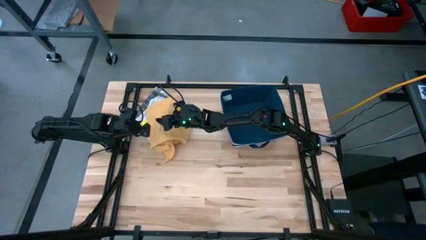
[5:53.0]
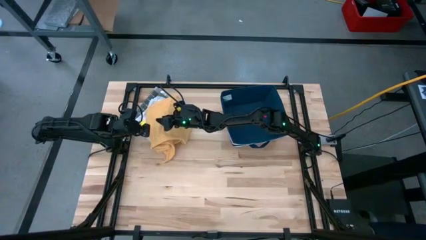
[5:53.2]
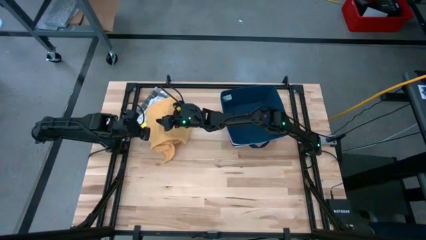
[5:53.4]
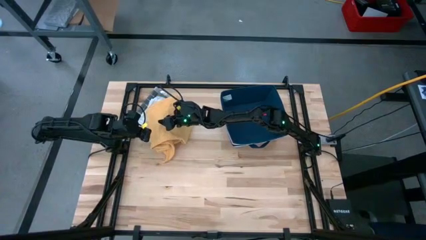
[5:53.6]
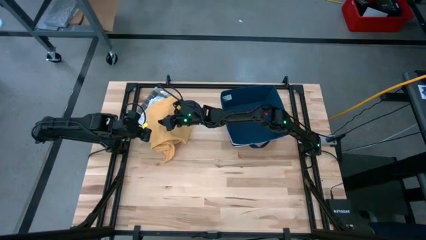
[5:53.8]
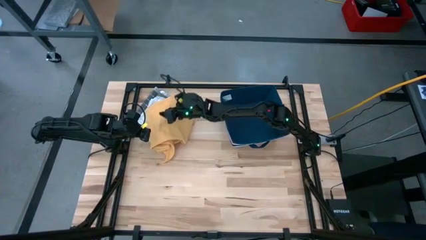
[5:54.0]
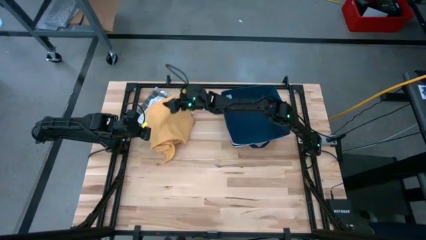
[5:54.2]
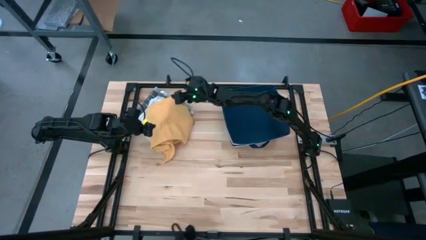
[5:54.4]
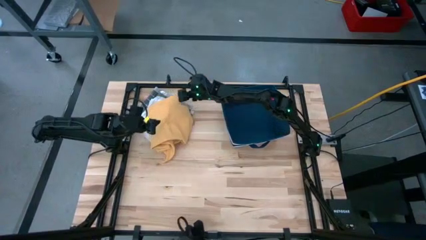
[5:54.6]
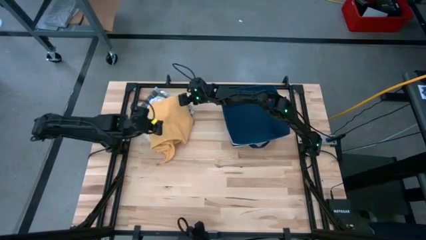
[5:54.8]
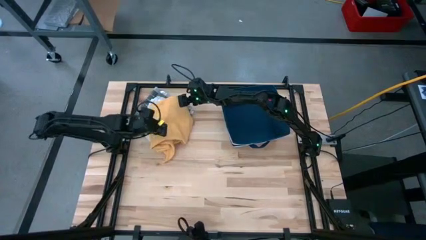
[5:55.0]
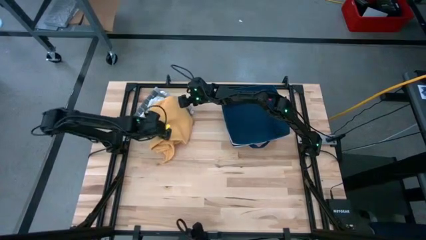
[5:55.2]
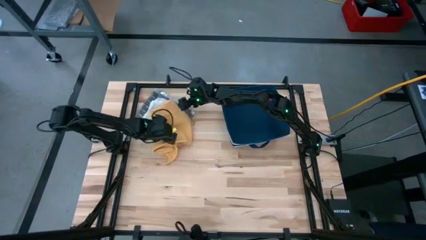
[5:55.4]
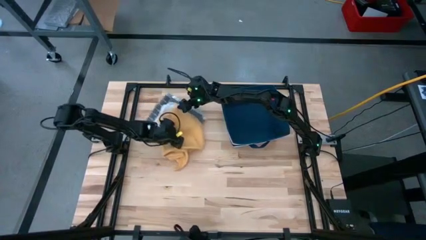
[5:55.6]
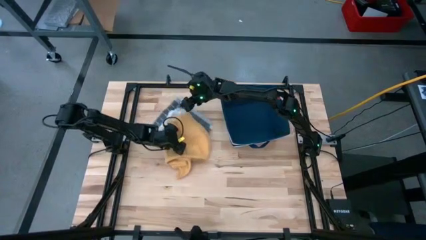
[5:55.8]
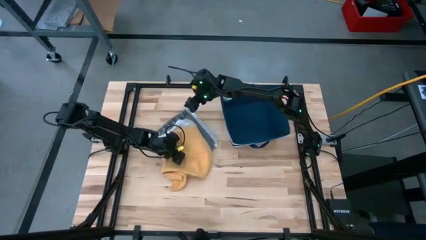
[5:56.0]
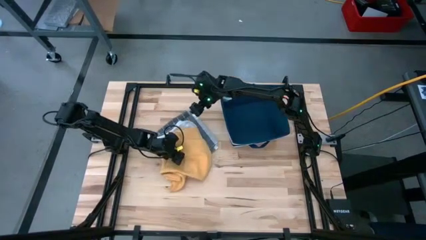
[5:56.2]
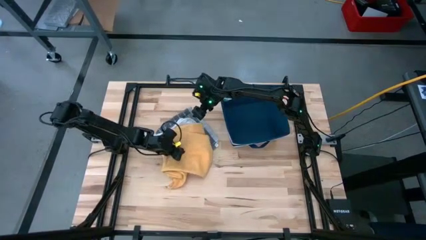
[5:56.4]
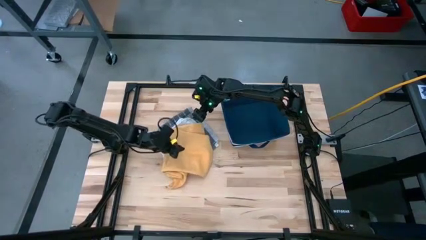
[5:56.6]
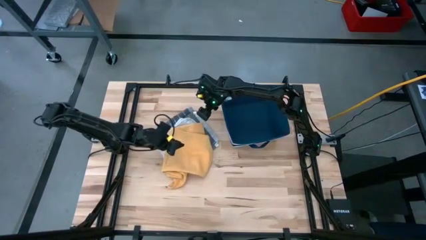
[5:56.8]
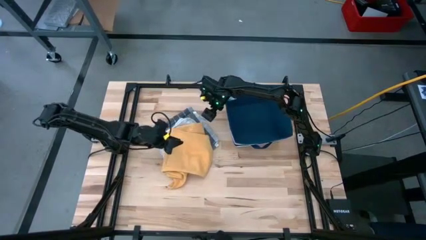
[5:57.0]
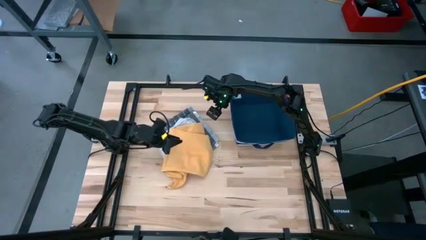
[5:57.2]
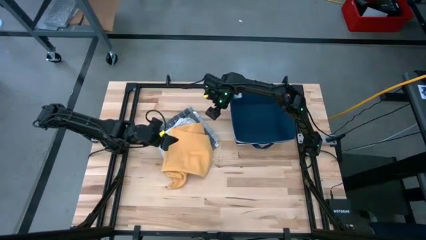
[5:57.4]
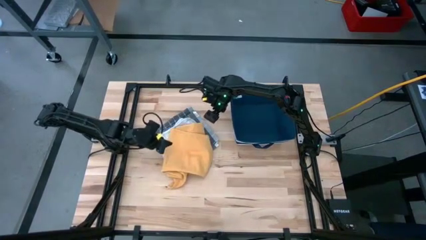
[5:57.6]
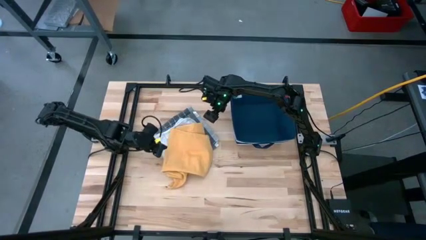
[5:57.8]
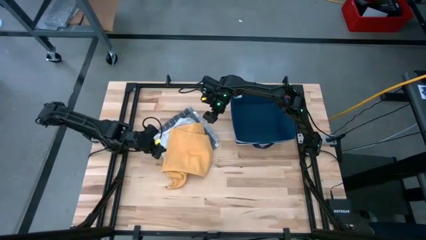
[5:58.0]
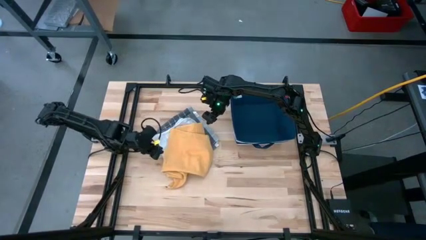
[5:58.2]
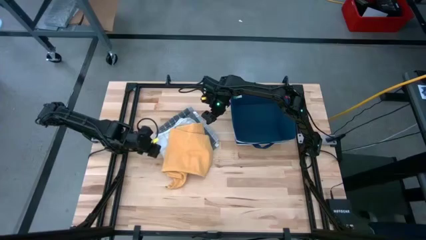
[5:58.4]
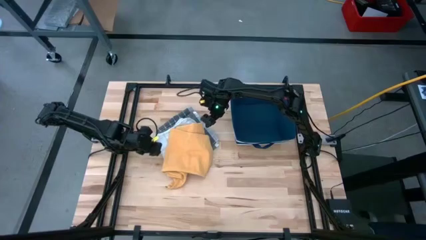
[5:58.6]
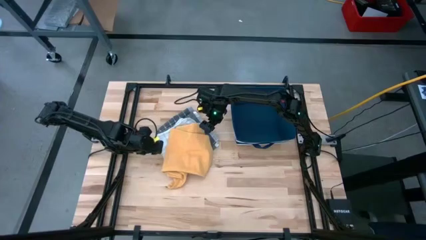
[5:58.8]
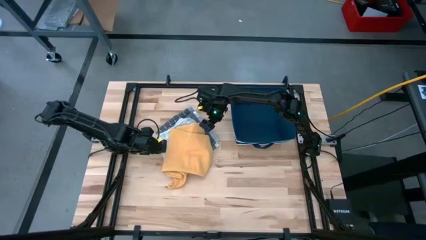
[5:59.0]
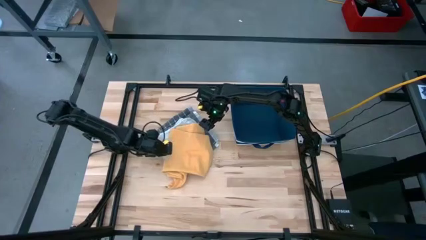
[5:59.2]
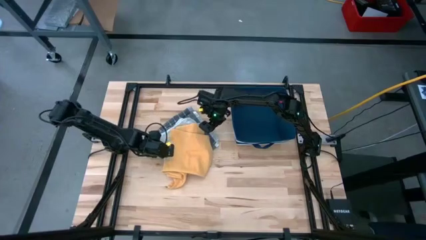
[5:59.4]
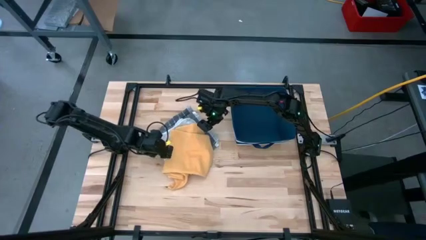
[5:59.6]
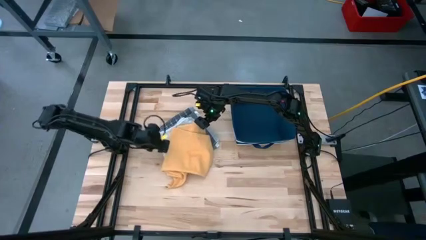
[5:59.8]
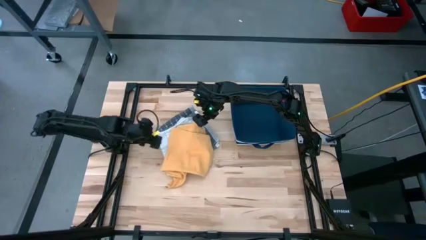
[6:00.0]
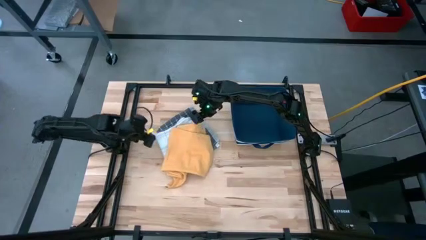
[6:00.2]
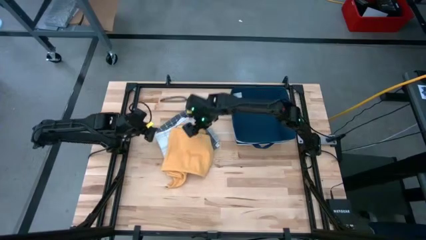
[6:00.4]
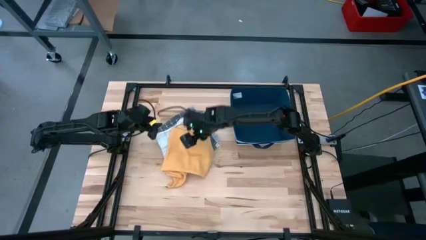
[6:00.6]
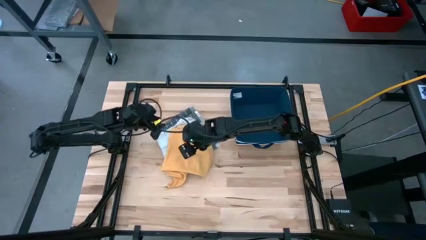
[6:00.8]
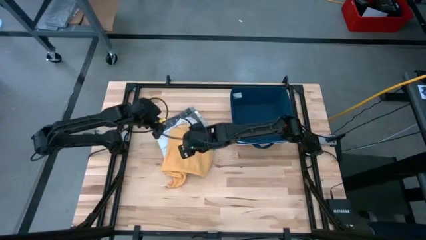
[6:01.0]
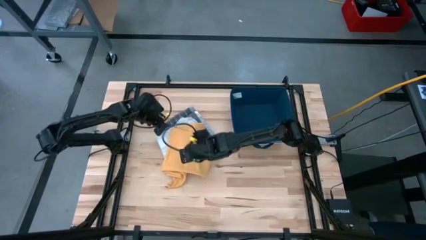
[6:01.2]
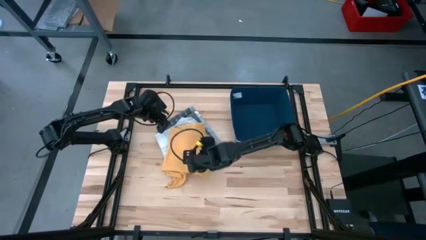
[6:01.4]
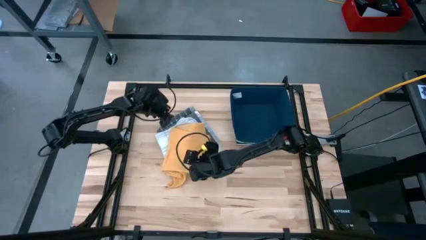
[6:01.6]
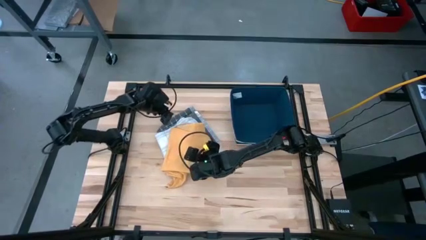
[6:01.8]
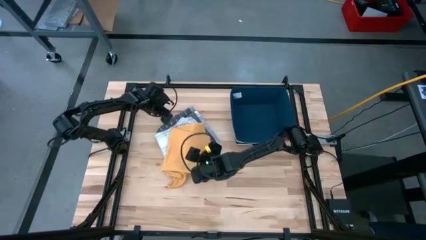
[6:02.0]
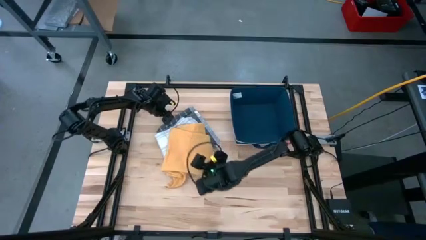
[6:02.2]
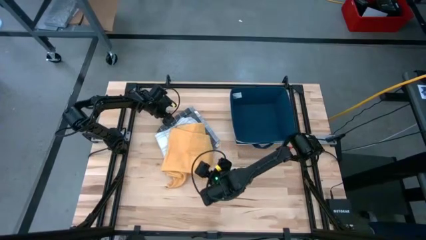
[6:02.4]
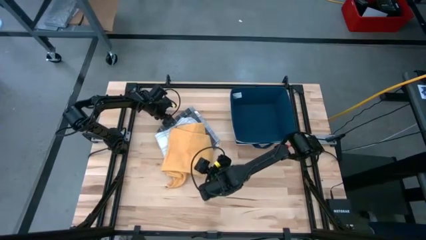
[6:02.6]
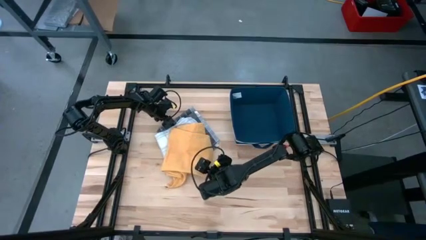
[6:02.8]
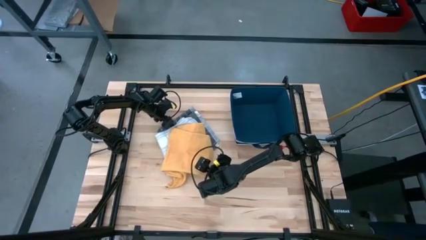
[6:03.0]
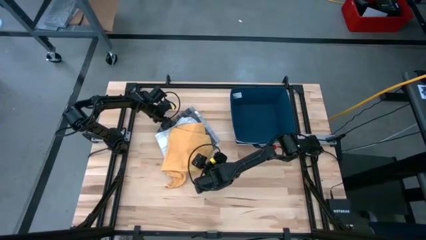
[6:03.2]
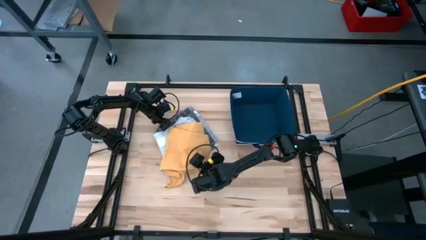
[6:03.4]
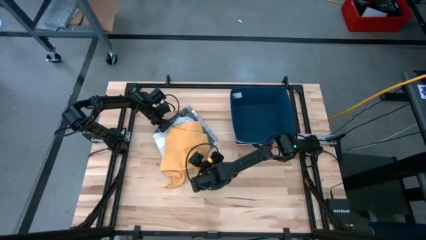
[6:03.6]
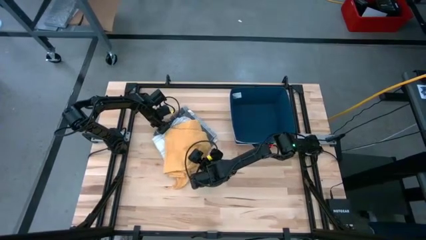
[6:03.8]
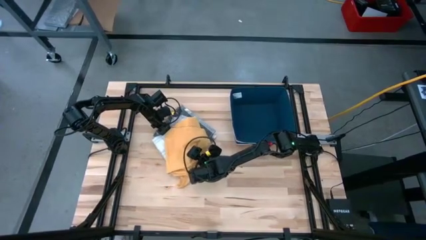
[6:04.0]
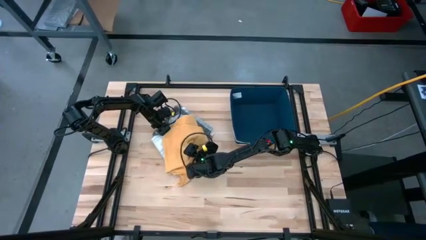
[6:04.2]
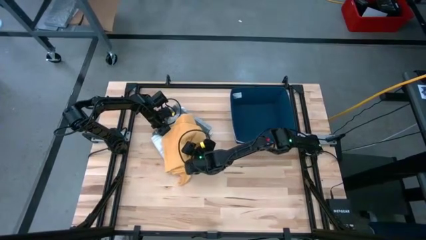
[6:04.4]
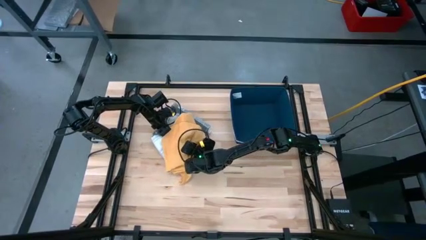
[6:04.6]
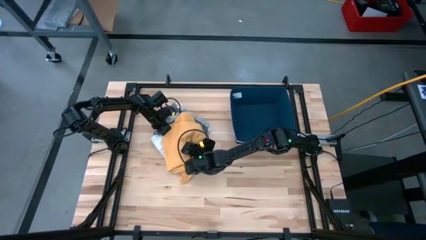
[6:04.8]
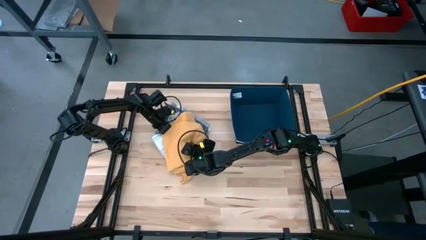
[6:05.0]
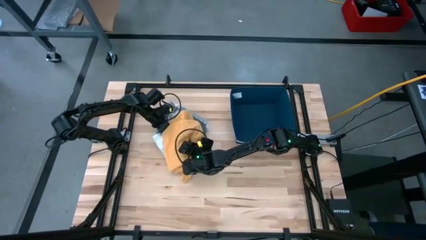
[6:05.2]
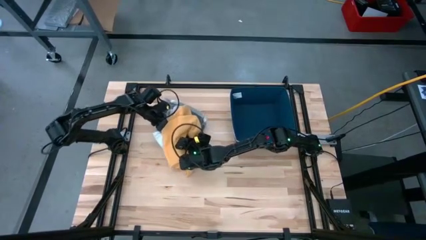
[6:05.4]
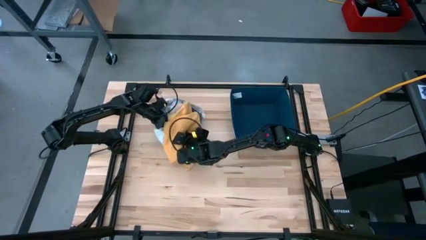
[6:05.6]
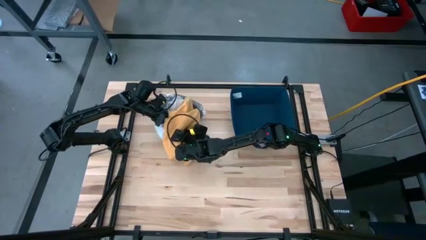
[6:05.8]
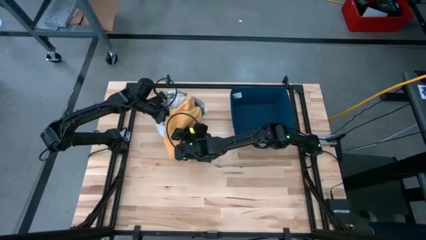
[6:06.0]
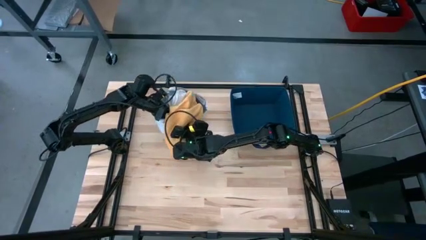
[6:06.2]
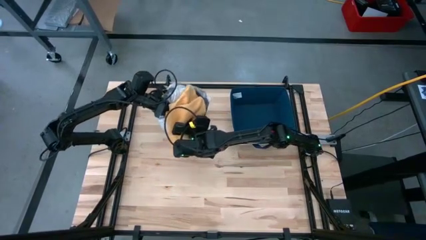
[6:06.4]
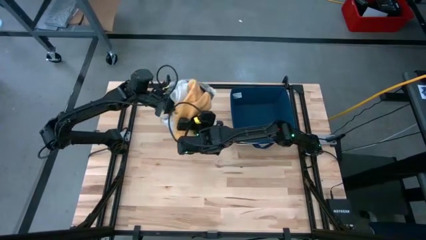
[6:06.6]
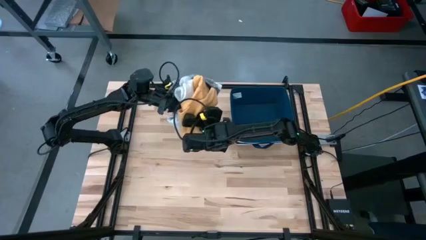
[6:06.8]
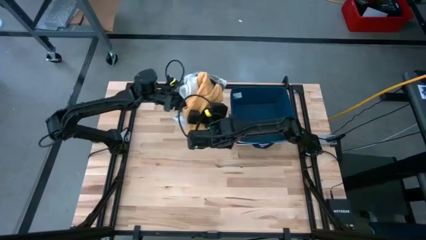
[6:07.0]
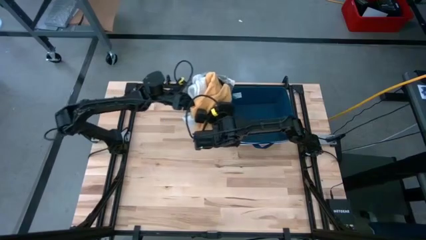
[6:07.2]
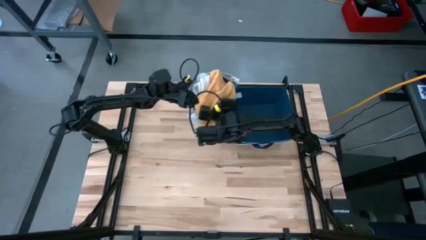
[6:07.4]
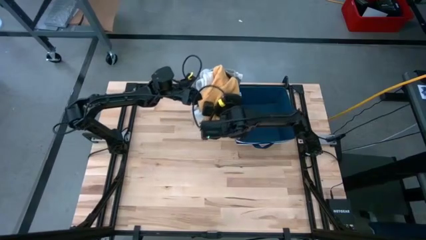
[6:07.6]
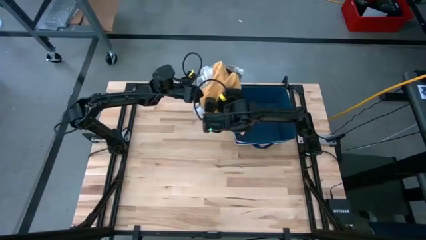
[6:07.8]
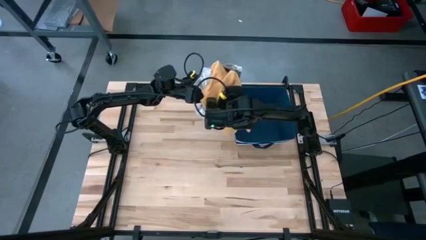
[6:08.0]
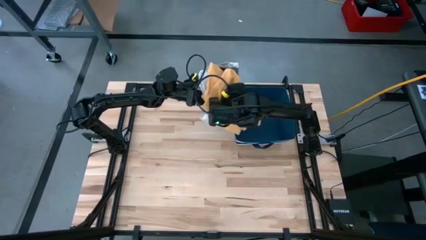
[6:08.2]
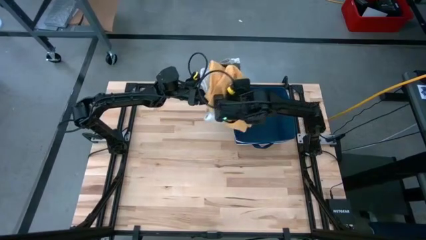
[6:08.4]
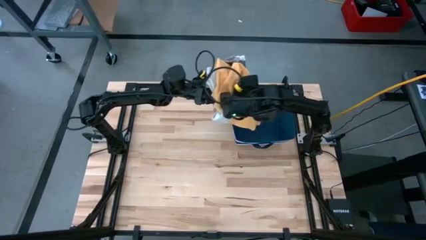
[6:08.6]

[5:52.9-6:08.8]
Task: Fold towel
Put the stacked folded towels into the blue laundry organizer

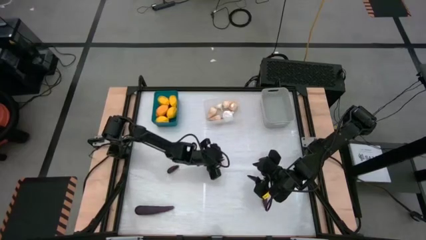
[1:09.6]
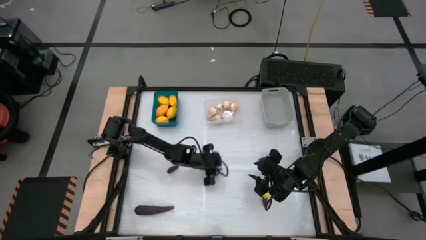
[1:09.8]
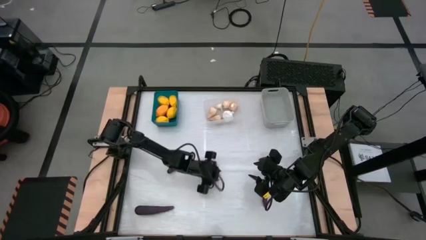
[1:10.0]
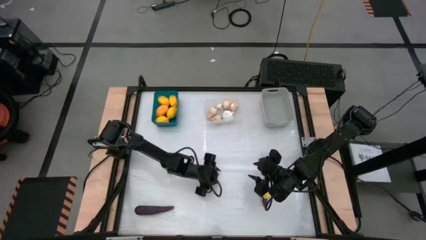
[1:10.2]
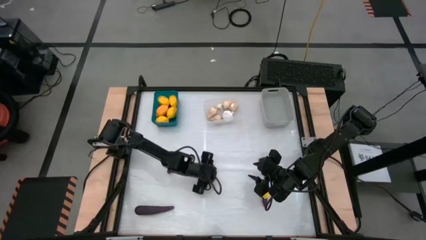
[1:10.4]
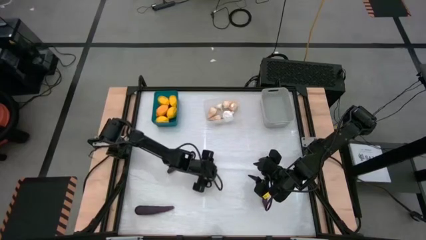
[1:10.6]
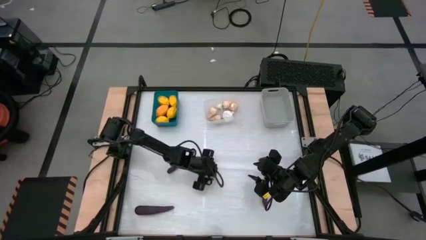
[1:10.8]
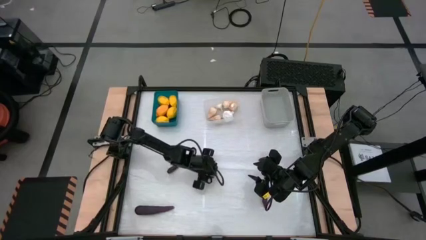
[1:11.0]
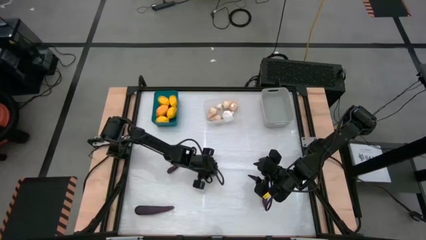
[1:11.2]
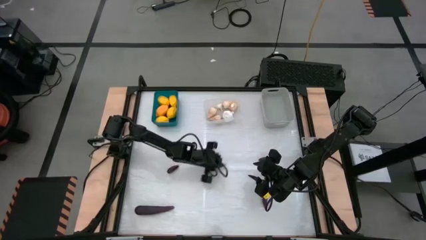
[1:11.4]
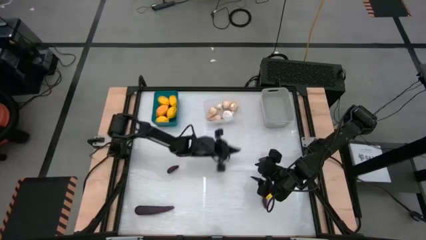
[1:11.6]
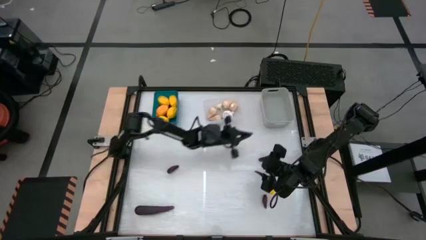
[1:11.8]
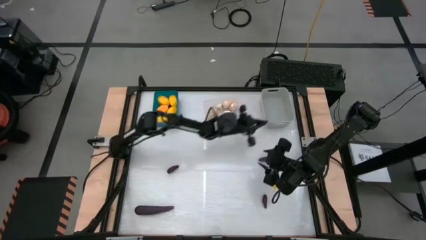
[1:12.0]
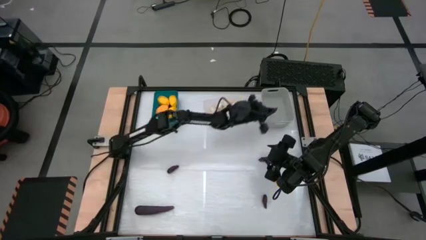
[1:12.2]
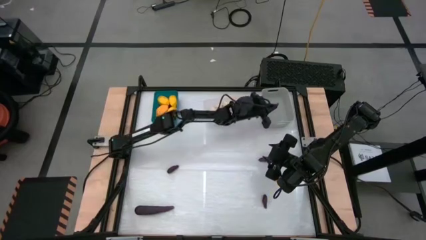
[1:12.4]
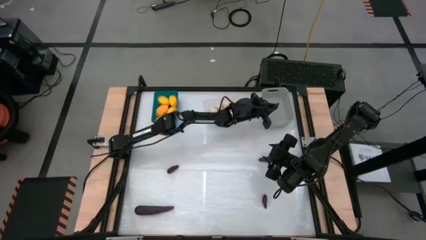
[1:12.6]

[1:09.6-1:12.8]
Task: Sort produce into baskets
Put the eggplant into the gray bin
